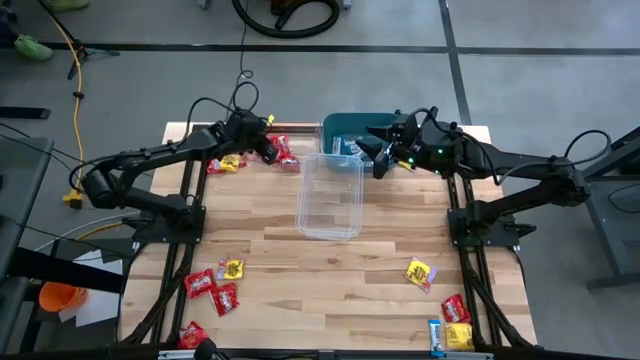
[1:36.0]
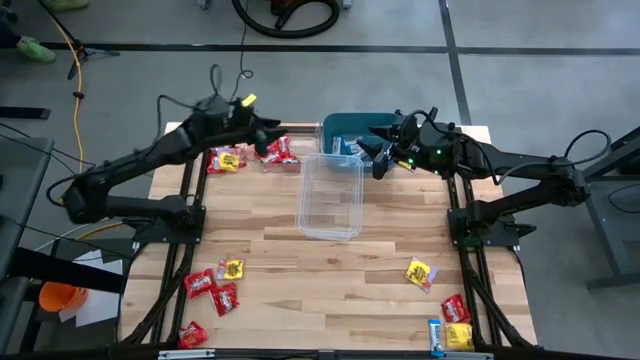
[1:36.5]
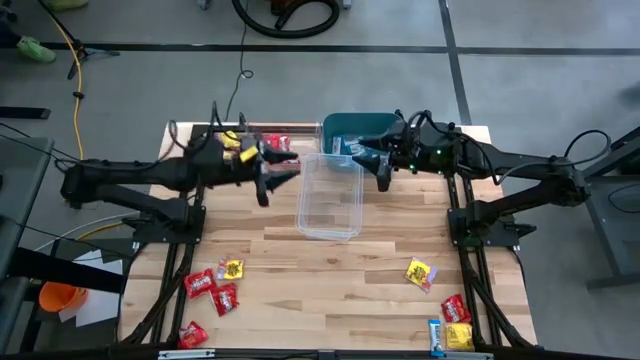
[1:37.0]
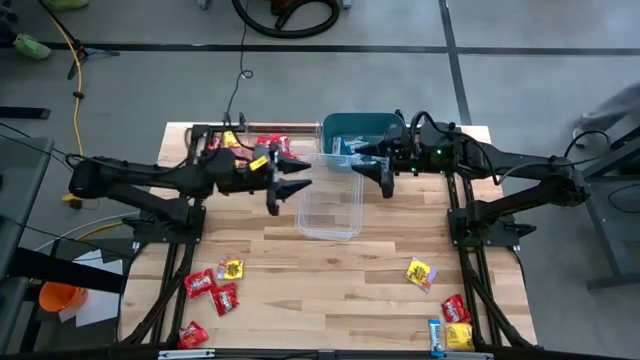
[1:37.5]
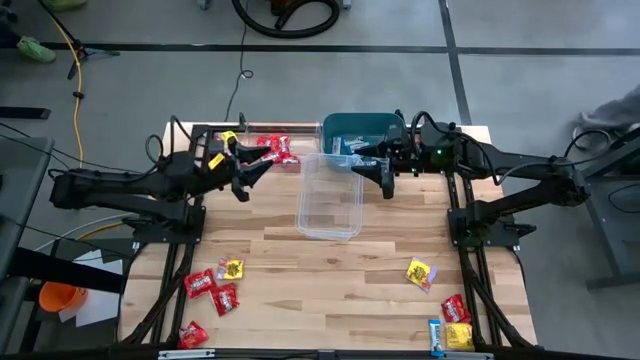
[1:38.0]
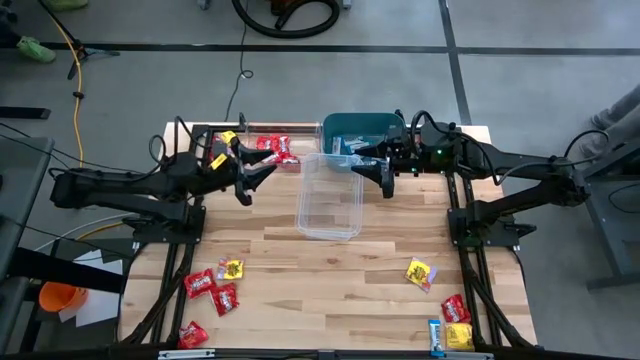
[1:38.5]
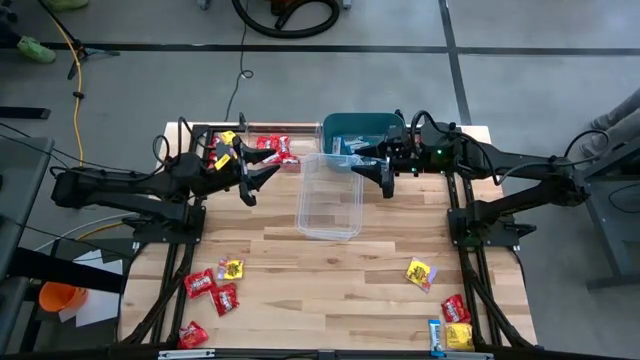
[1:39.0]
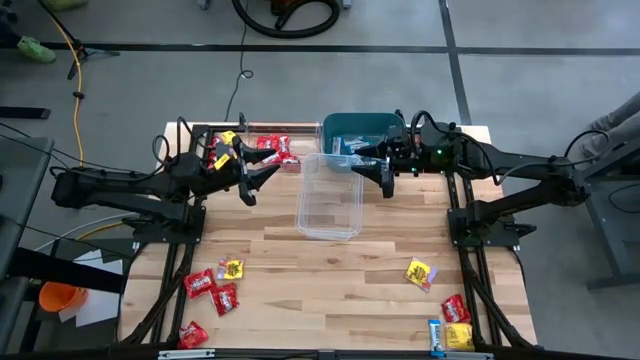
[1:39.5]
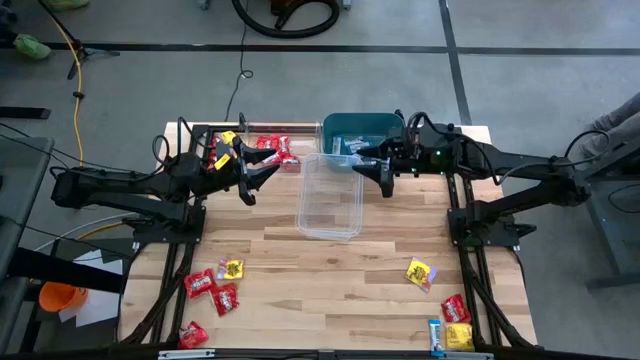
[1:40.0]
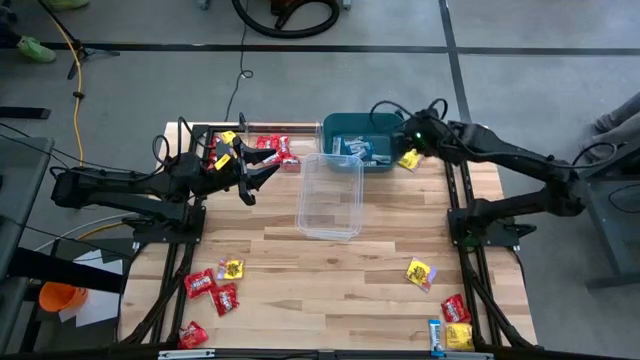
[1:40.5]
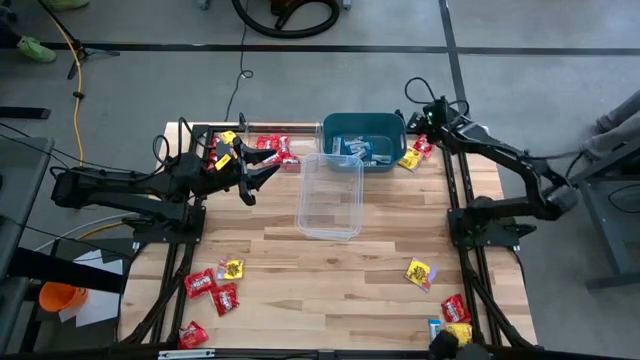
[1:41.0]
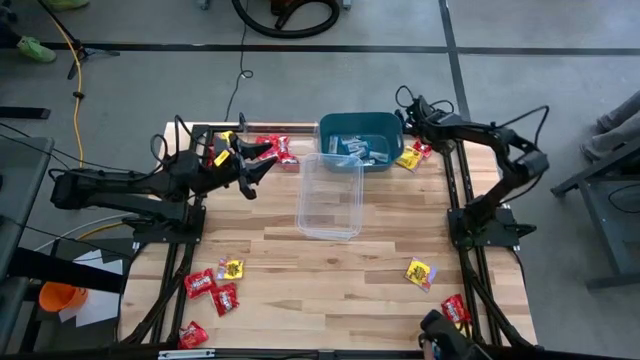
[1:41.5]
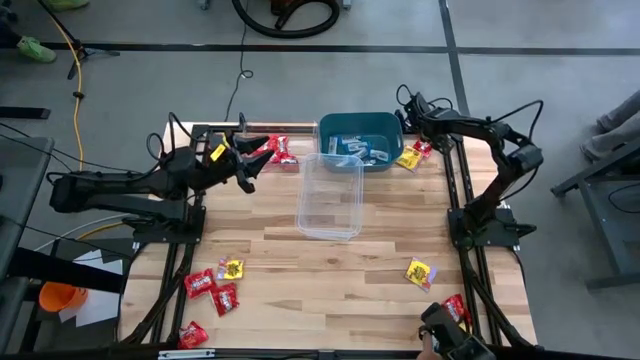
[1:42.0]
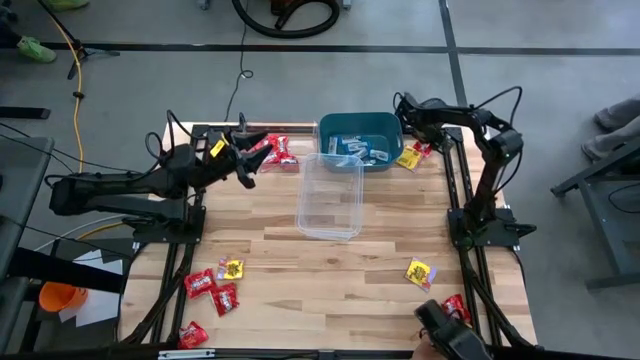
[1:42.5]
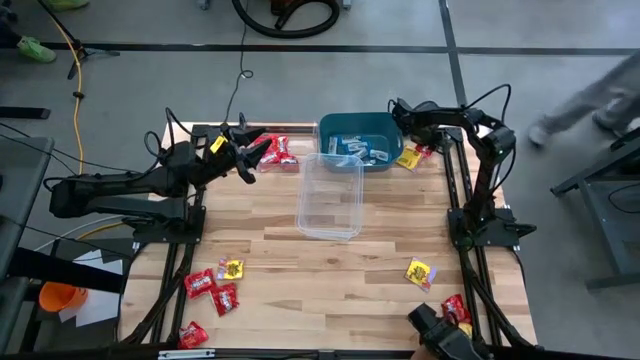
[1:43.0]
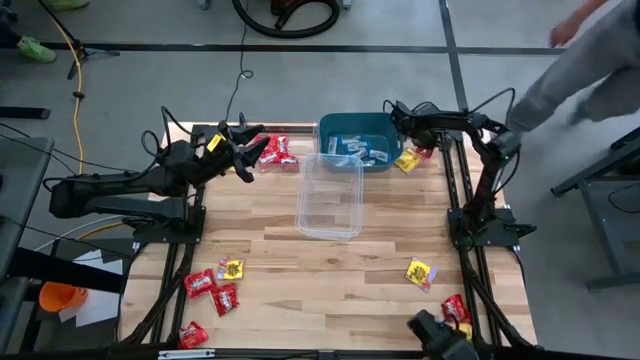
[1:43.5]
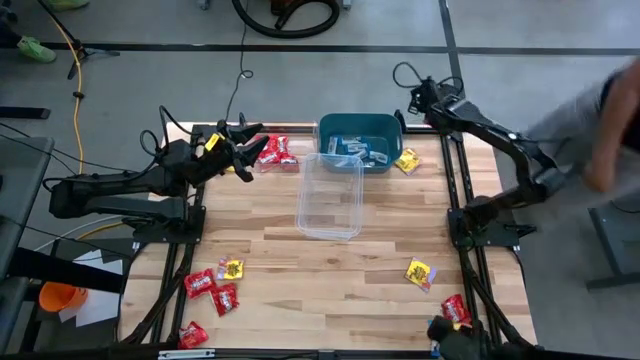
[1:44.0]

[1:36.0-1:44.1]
Task: Sort candy
Put the red candy into the transparent bin

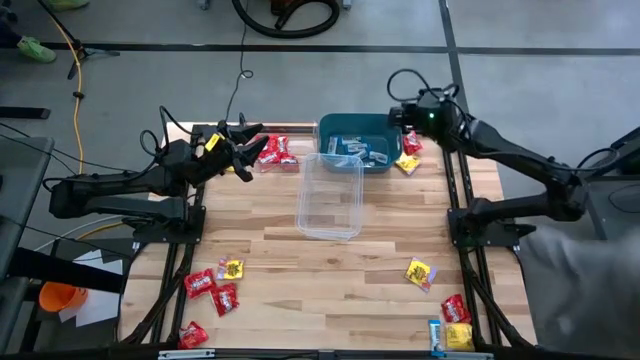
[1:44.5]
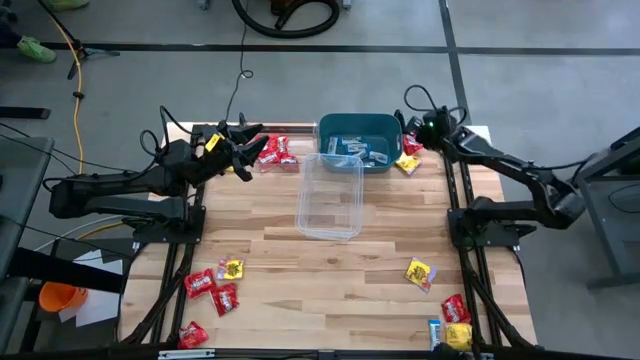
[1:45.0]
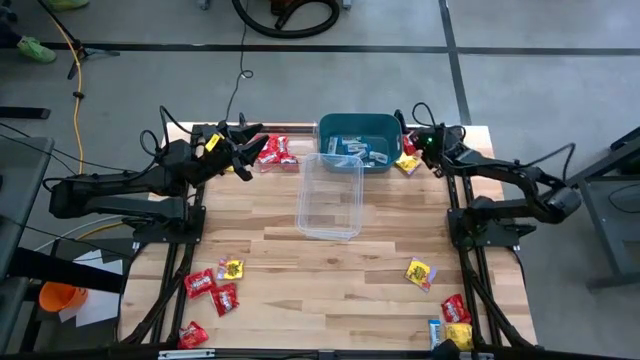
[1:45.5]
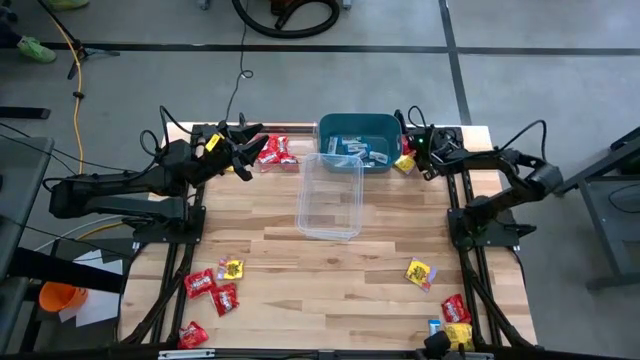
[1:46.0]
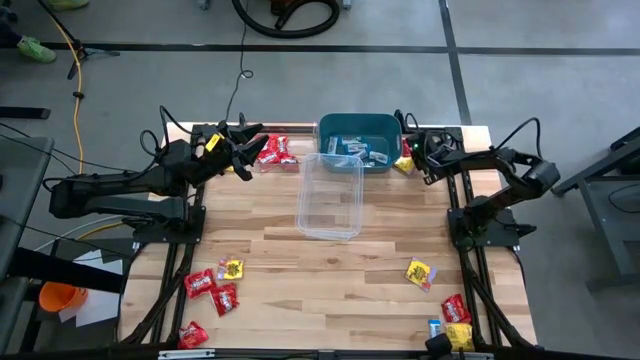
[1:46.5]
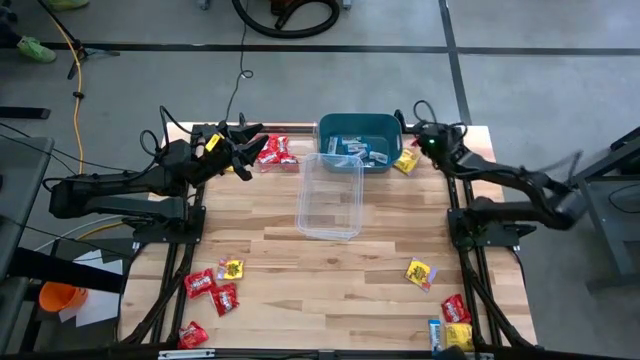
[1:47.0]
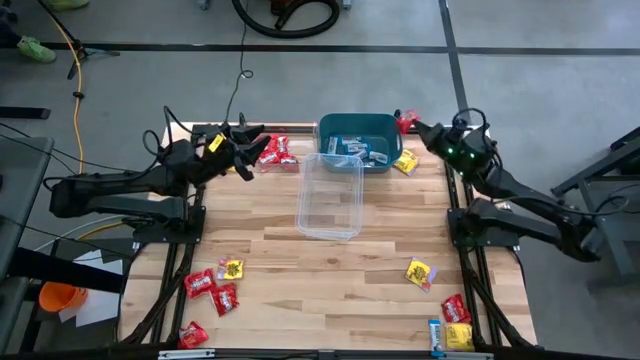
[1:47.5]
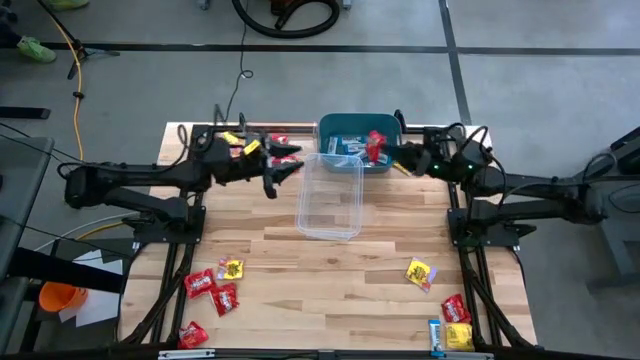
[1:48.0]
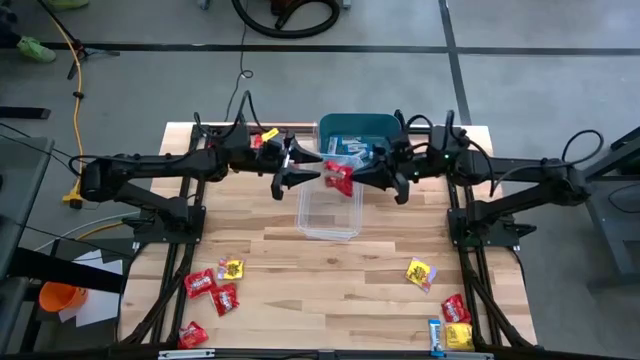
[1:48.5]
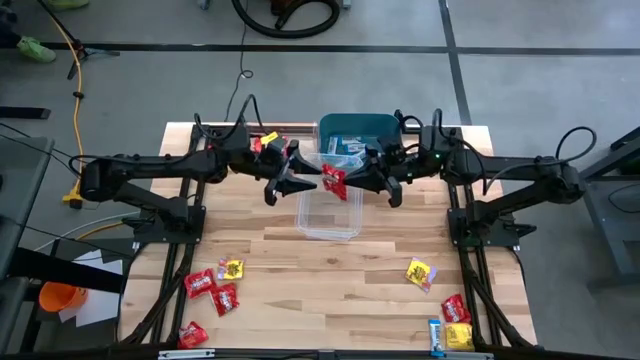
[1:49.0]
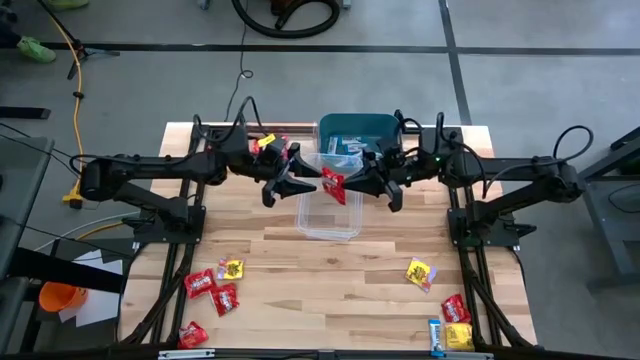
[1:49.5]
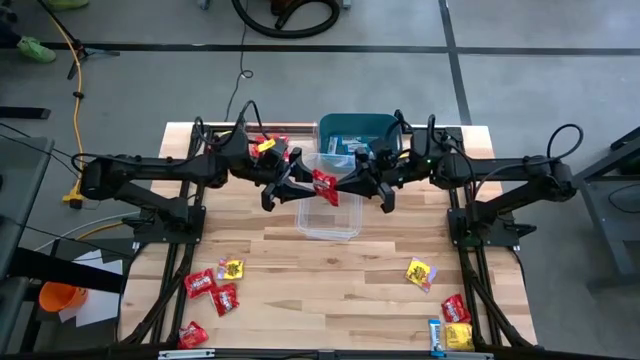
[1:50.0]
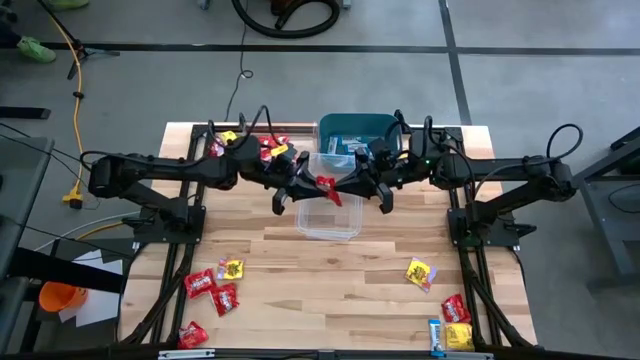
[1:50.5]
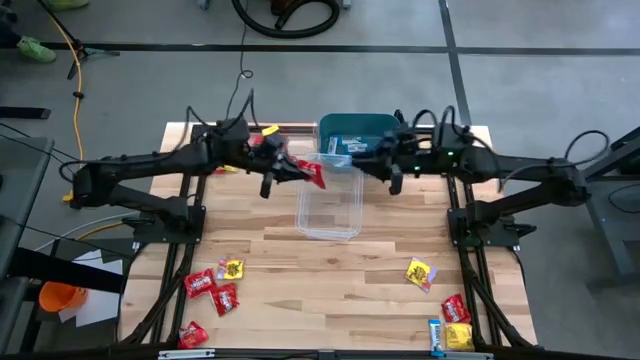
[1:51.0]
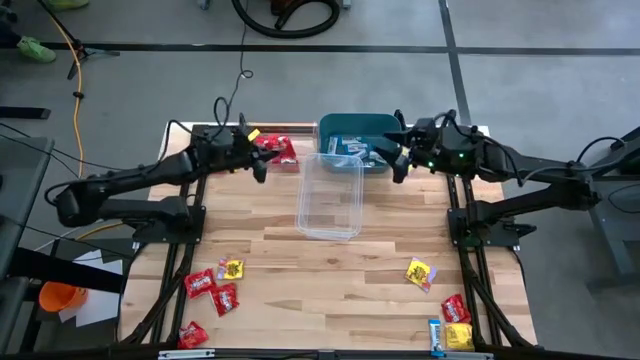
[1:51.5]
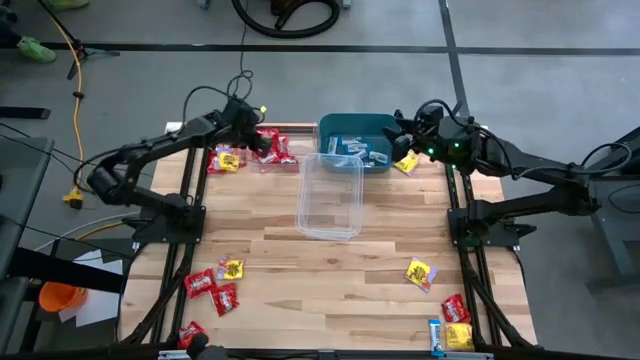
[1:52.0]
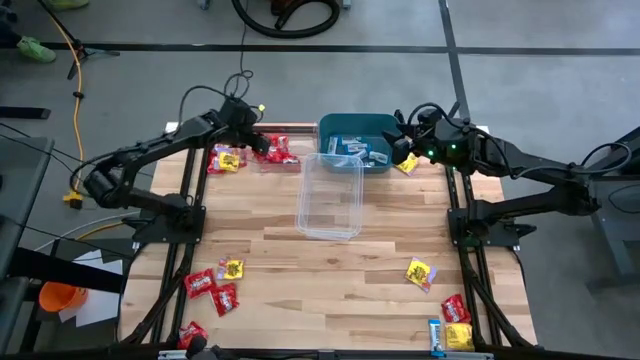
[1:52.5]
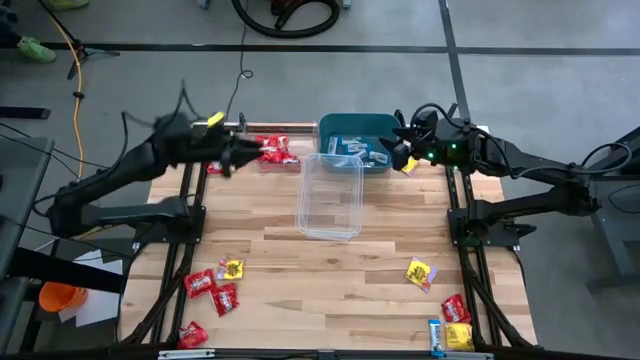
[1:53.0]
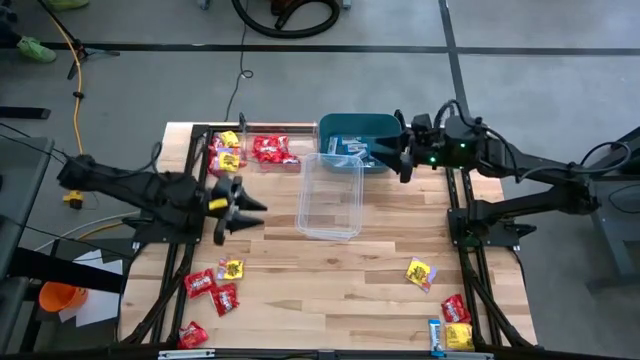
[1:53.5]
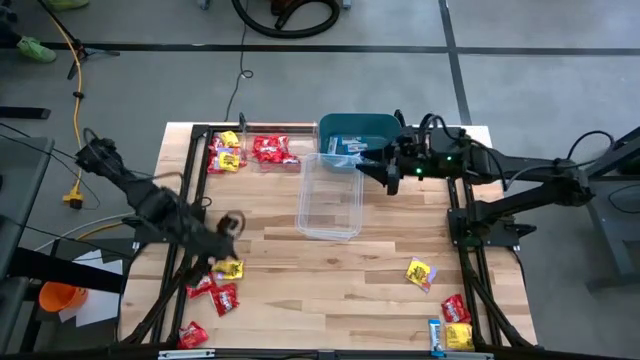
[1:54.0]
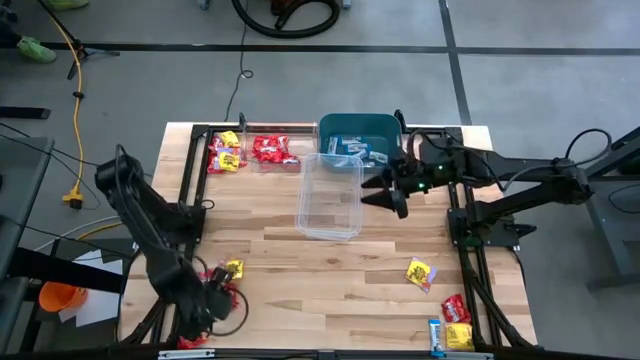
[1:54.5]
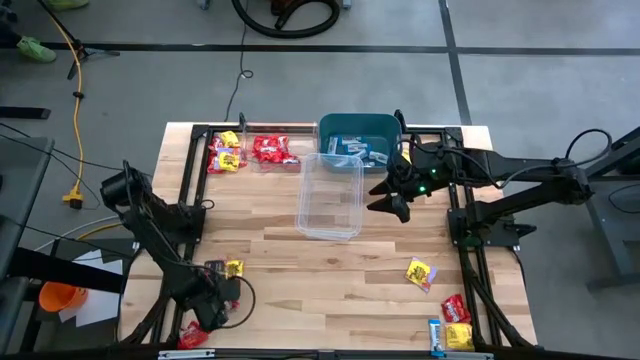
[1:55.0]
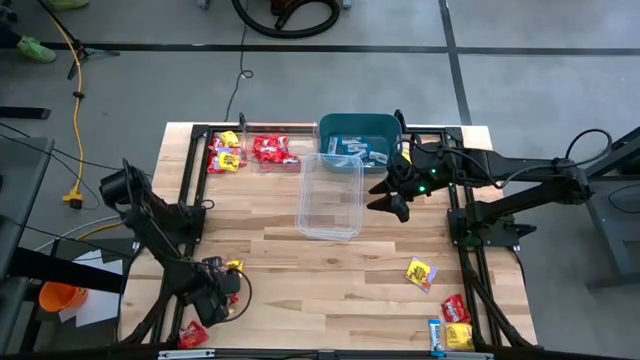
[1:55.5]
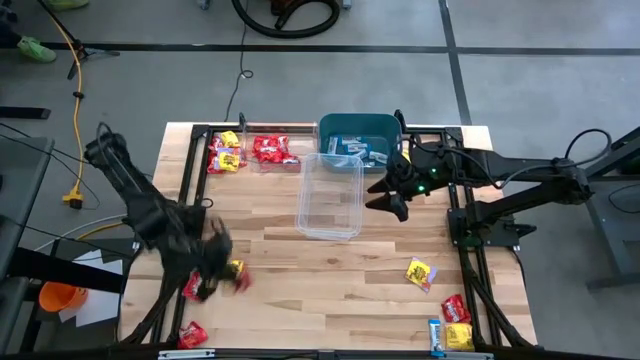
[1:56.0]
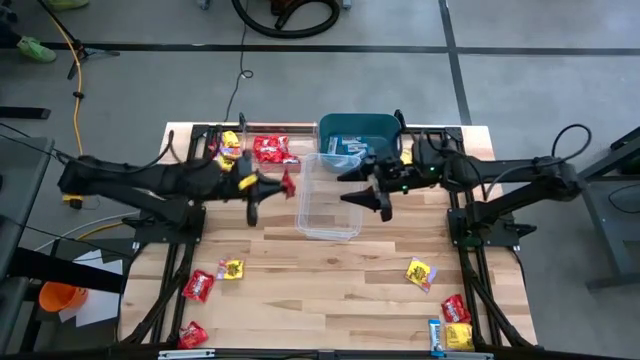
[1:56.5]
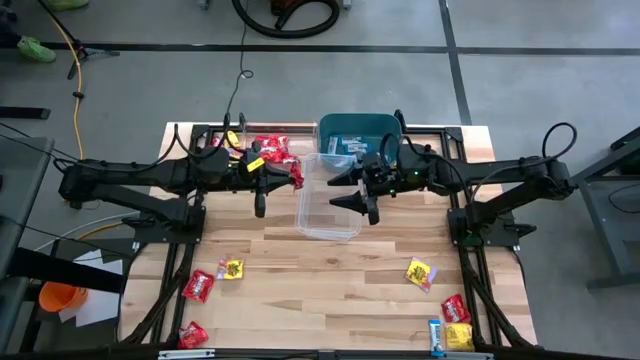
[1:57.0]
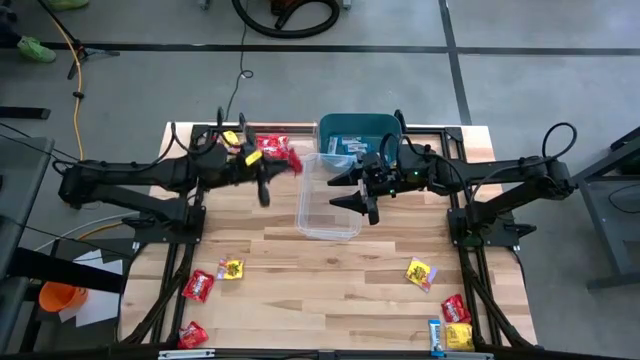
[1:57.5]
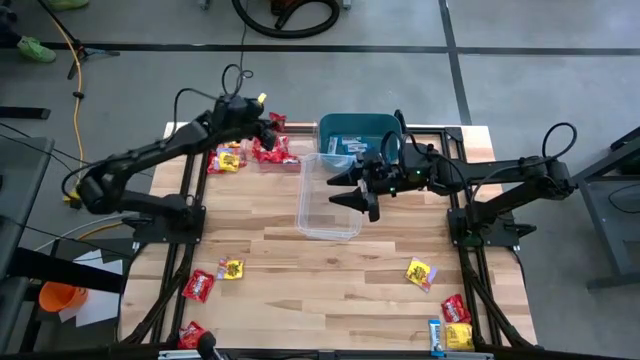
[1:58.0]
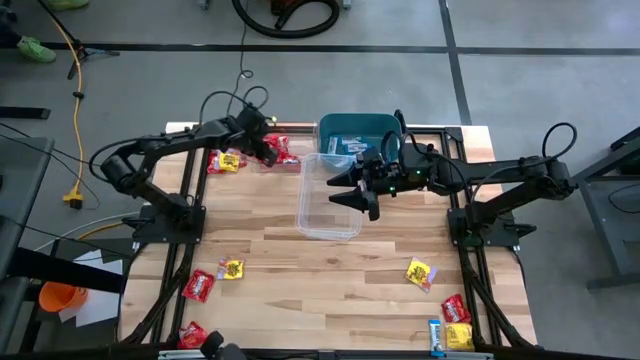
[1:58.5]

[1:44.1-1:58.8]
Put the red candy into the transparent bin
